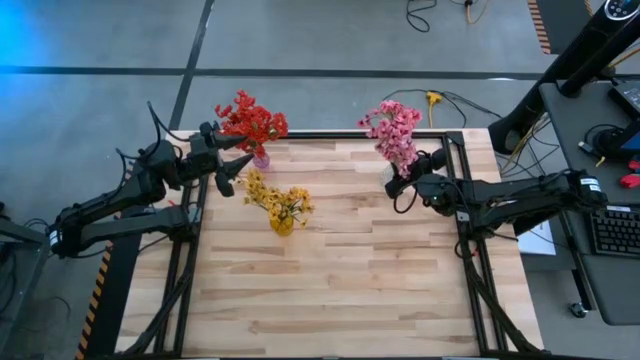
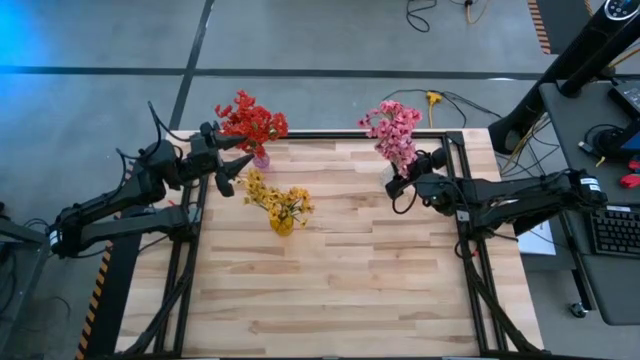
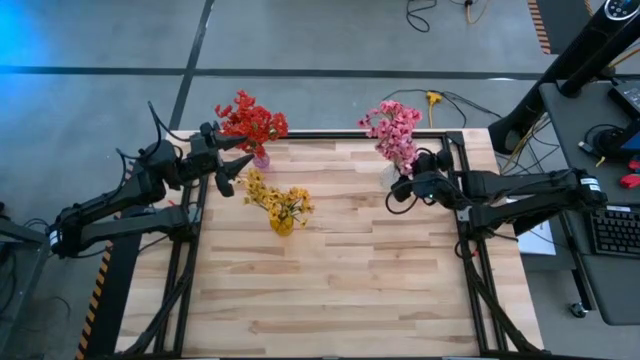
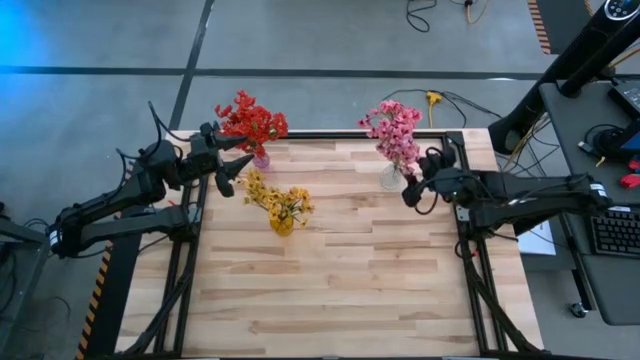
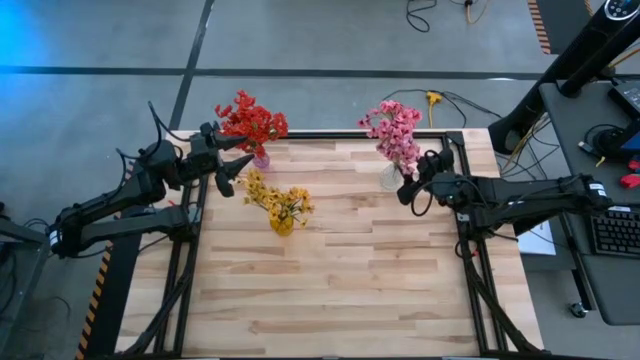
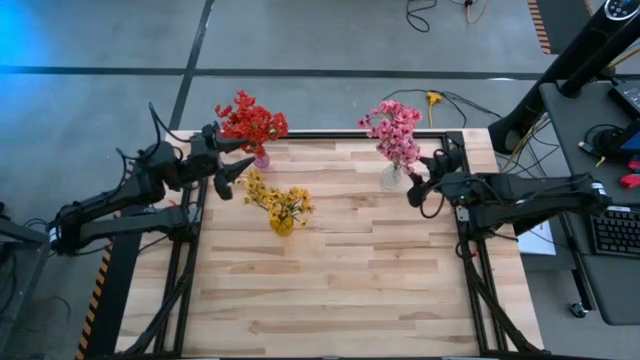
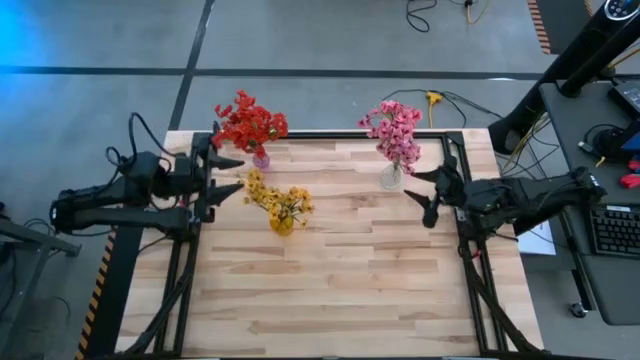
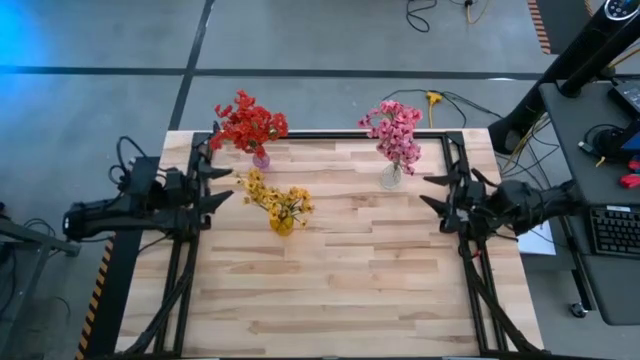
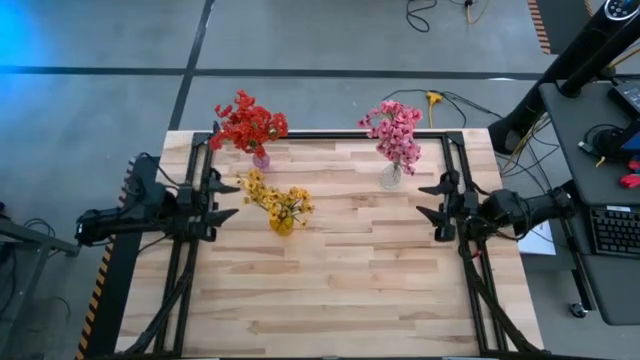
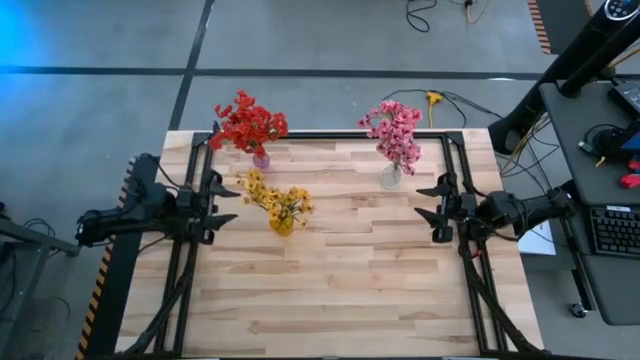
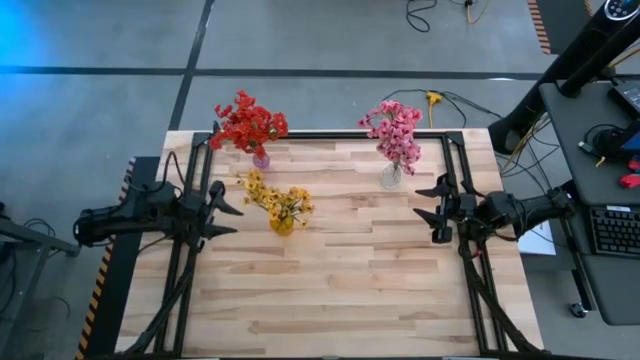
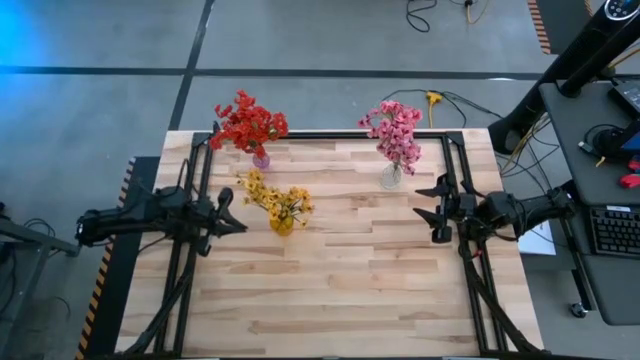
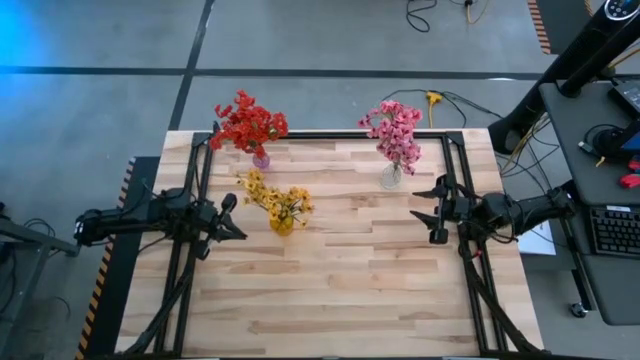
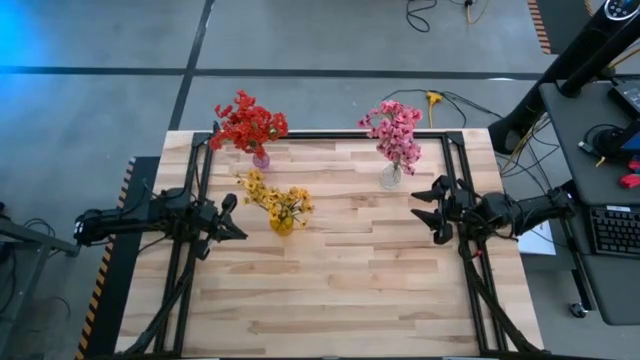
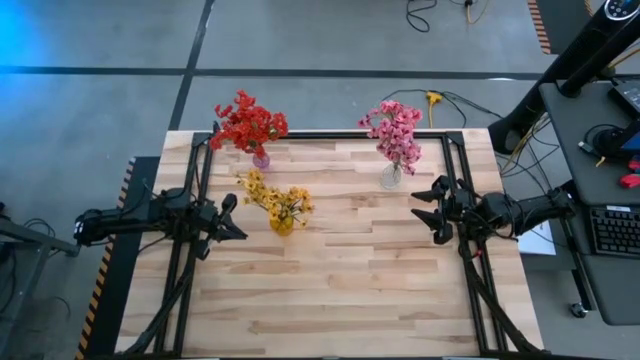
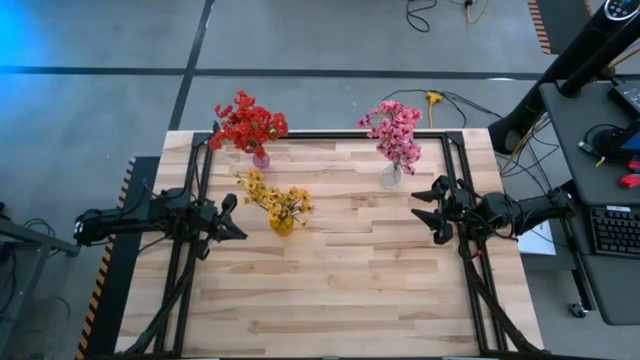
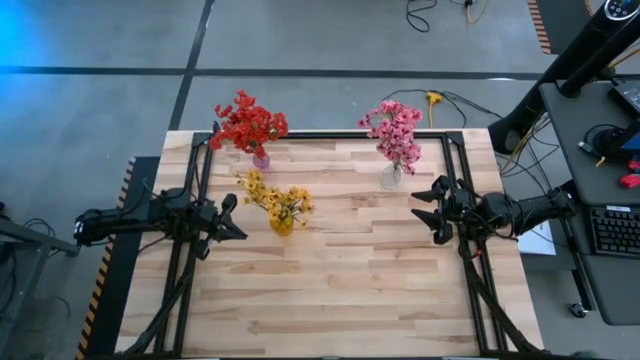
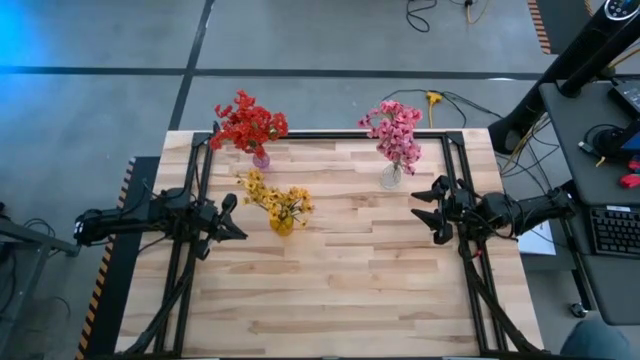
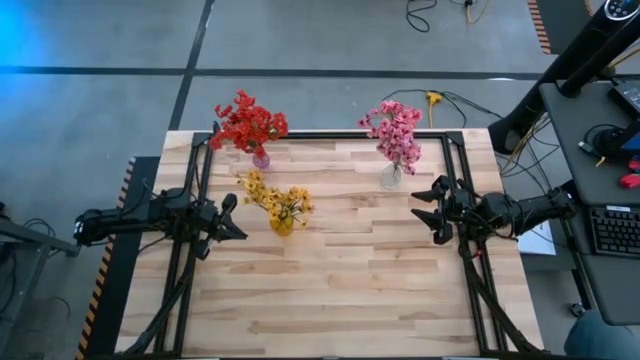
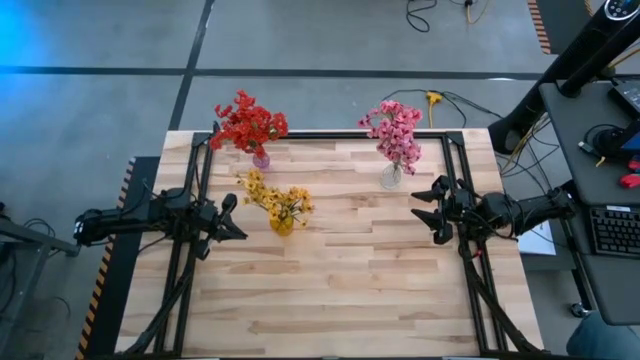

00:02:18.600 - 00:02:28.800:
Task: Sort flowers into vase by color
Return to Home Position
